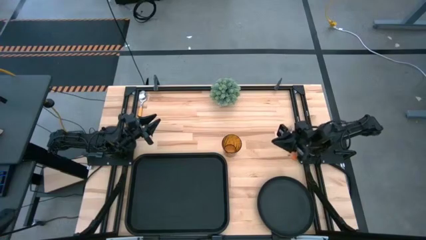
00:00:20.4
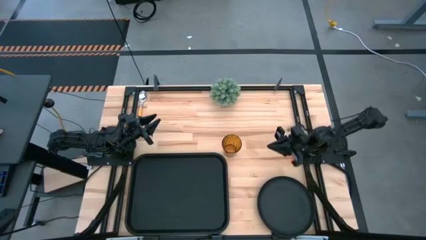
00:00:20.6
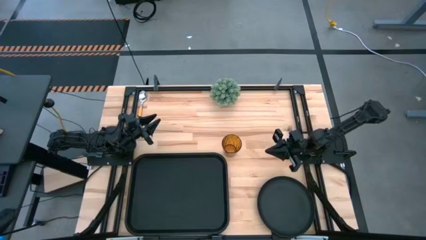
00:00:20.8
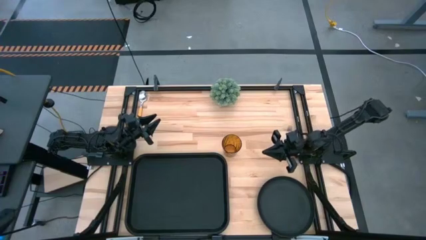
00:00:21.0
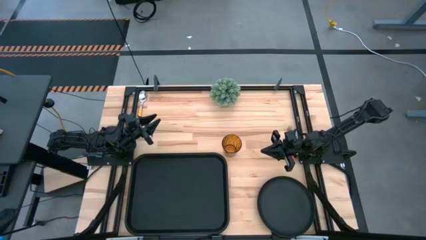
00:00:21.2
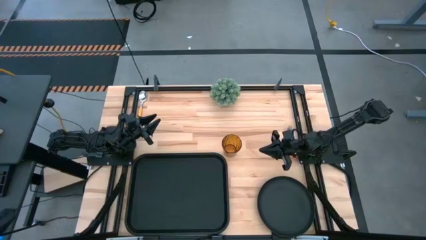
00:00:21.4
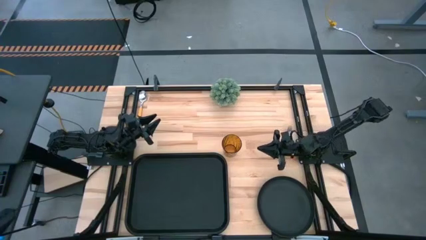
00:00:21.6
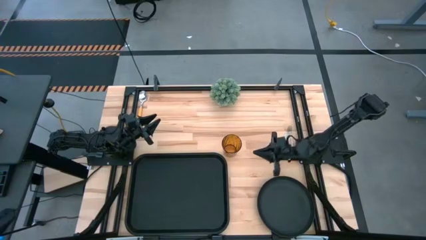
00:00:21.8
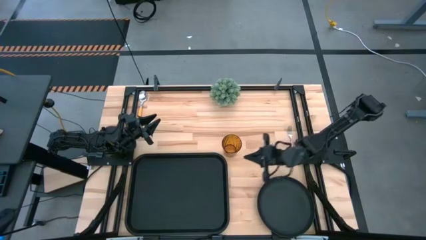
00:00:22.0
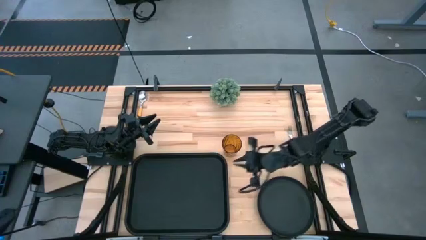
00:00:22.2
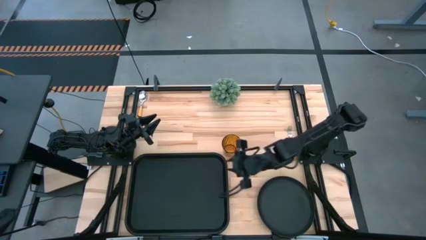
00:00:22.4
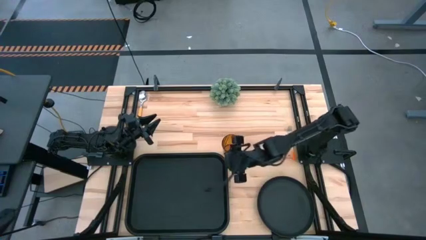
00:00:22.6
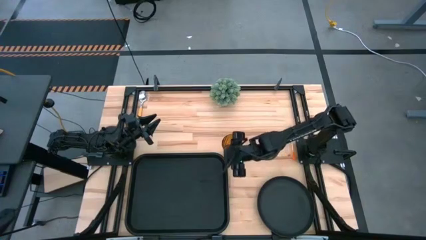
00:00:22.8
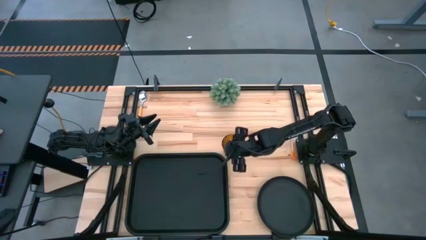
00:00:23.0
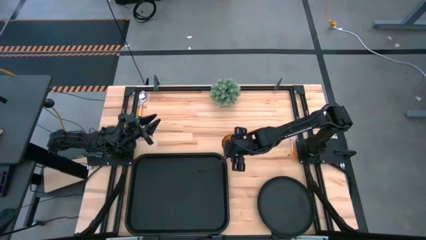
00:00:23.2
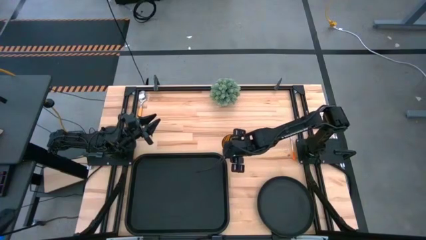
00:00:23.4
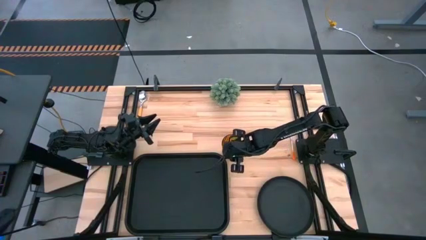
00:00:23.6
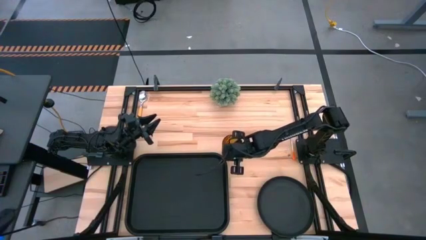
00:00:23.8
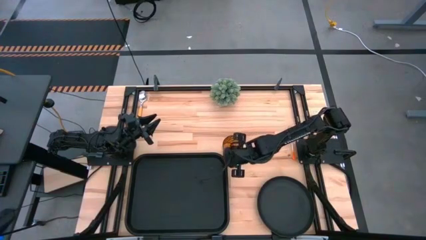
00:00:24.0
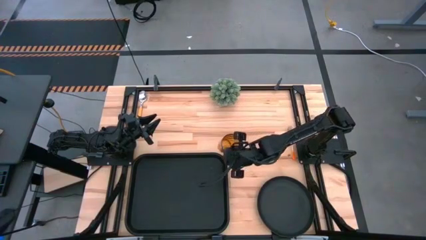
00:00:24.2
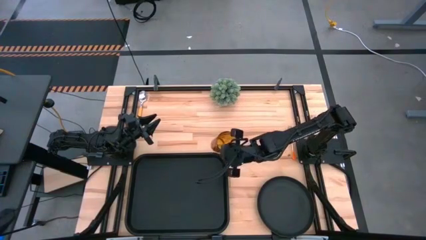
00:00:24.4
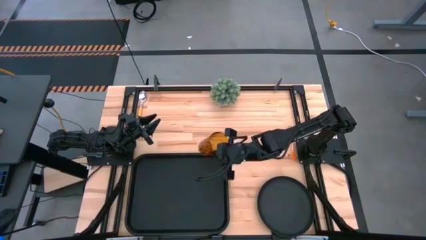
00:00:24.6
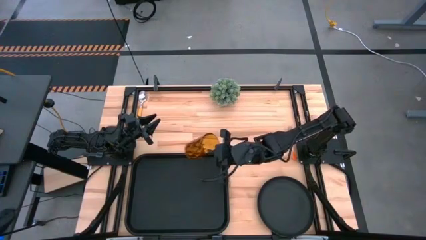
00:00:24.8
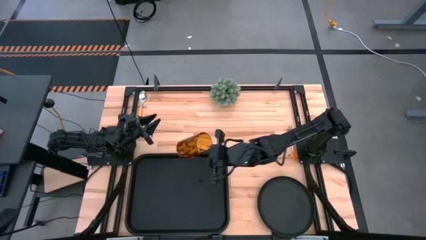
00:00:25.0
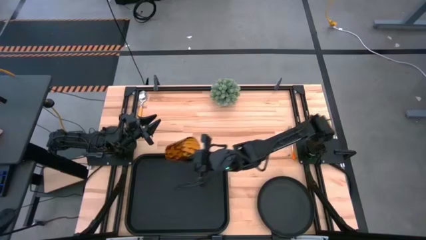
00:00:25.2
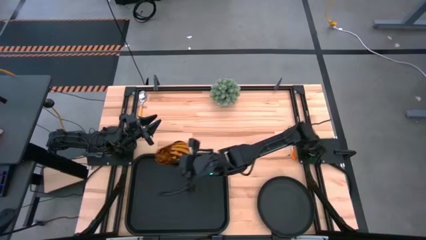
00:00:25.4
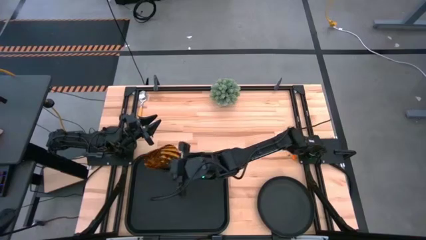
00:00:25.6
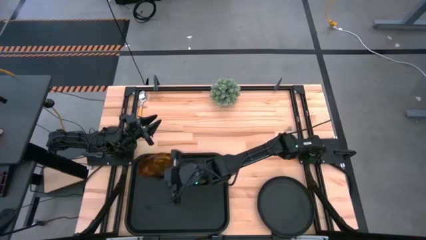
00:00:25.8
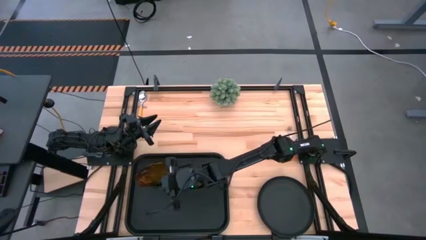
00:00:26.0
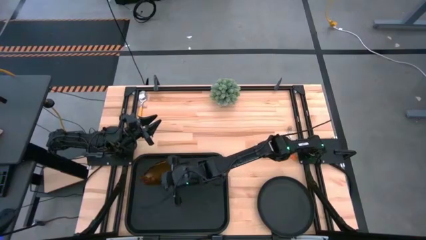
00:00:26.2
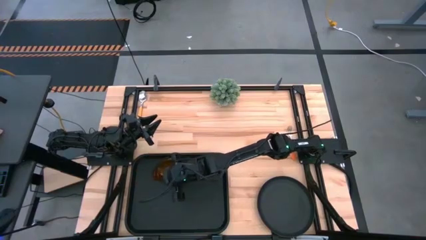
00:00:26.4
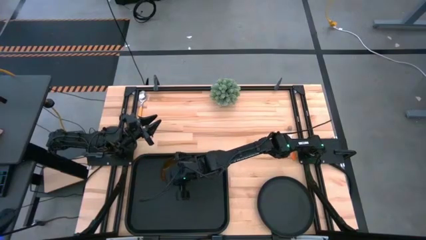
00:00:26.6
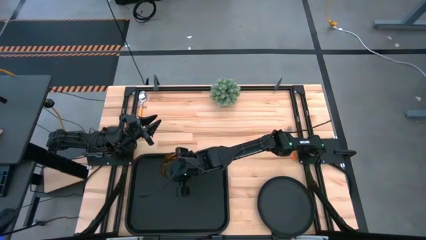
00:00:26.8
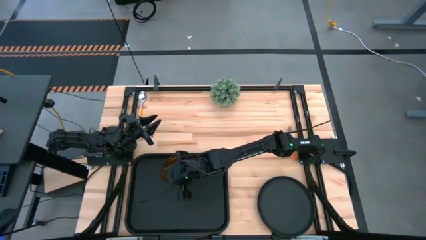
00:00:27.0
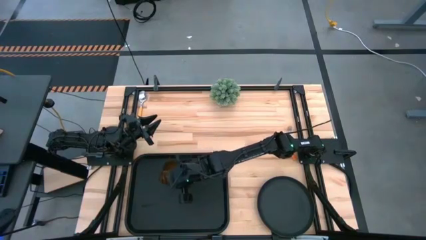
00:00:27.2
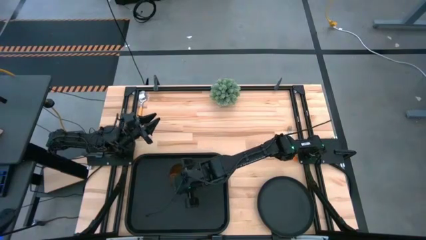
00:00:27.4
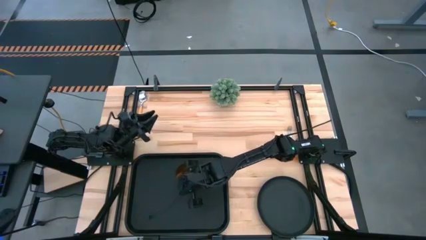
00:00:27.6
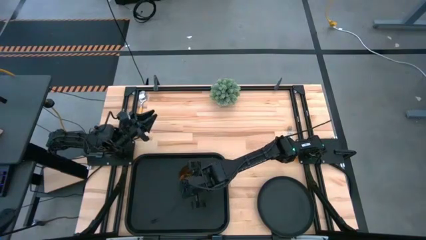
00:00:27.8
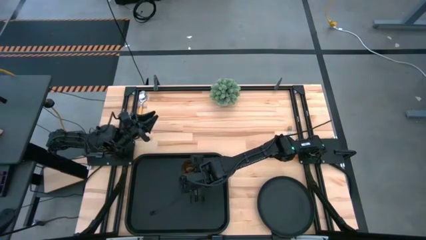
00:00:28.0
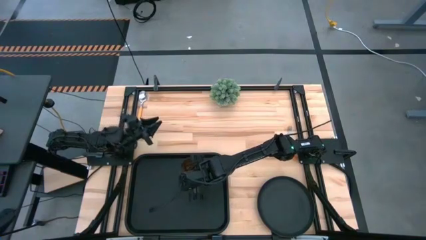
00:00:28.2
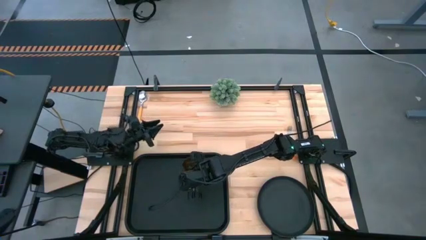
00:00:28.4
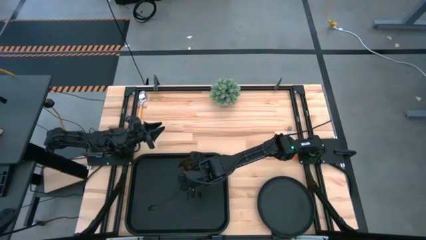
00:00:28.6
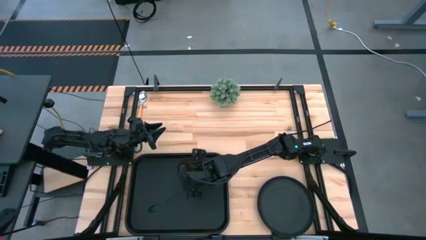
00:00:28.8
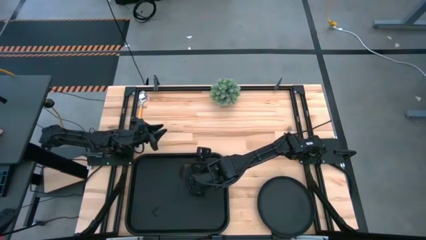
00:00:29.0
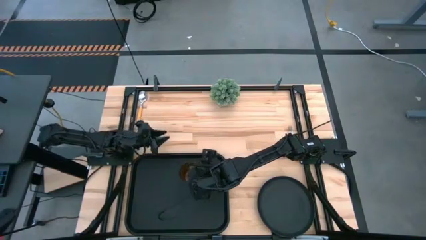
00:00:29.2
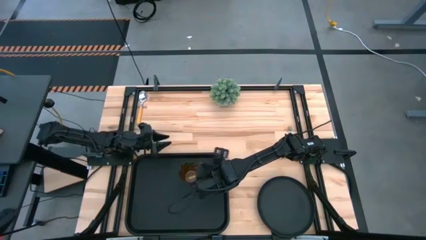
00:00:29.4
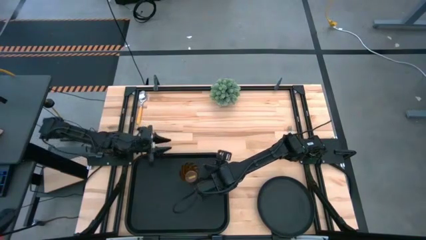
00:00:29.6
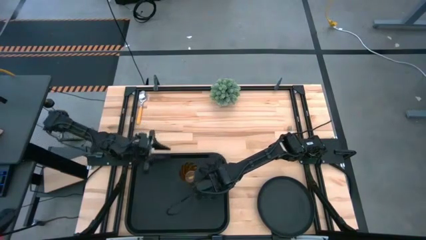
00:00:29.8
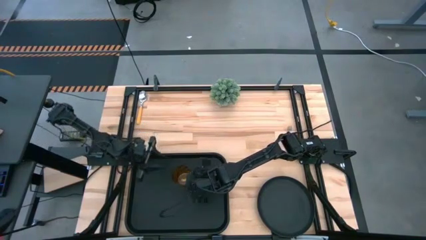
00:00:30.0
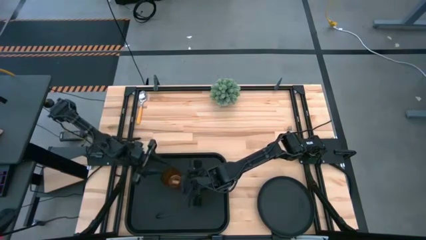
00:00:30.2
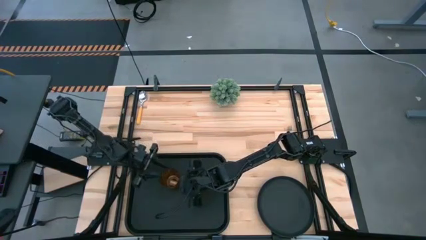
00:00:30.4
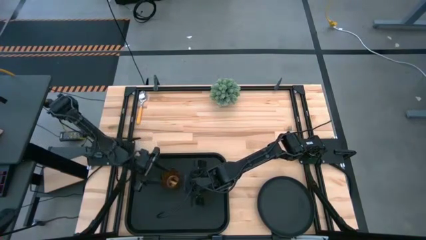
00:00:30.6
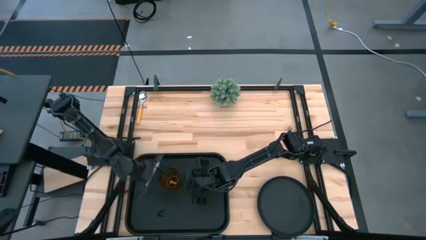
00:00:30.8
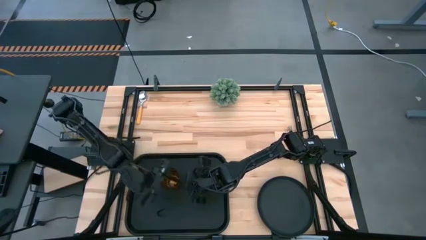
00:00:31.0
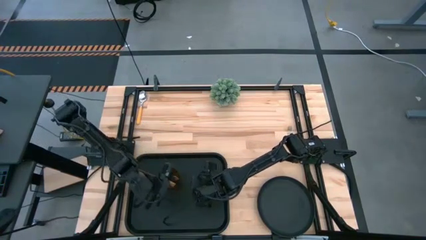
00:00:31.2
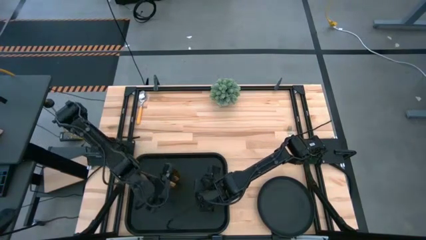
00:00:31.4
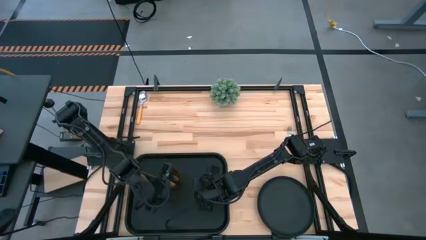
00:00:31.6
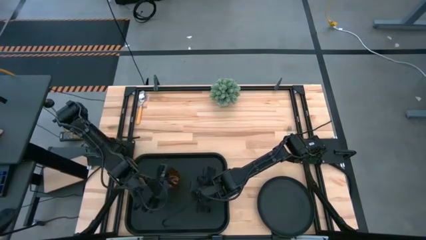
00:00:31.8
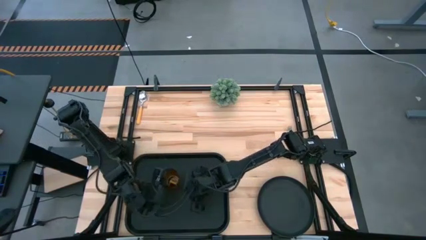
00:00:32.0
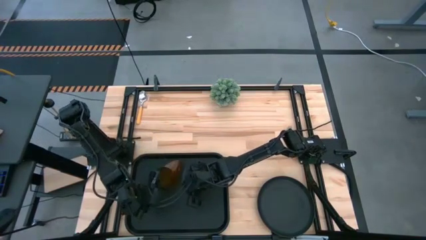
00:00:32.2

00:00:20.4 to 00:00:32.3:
Task: Pick and place plate/cup/fork/spoon on tray
Put the brown cup on the black serving tray

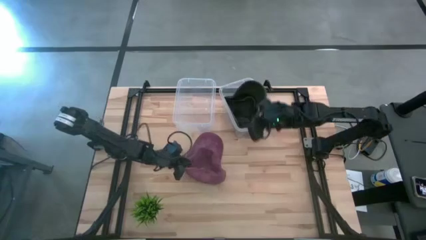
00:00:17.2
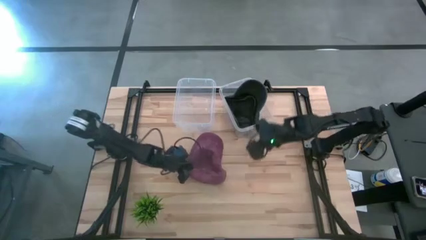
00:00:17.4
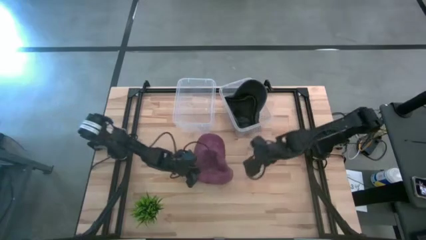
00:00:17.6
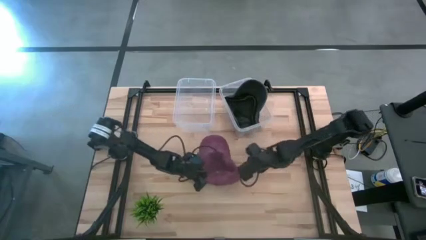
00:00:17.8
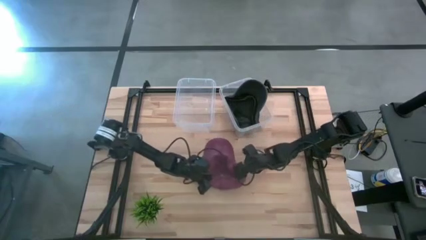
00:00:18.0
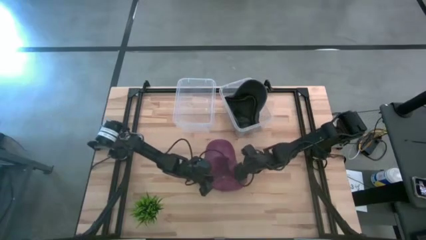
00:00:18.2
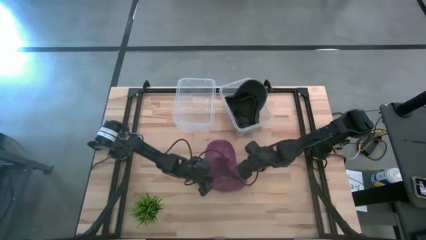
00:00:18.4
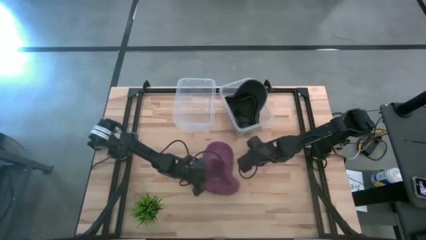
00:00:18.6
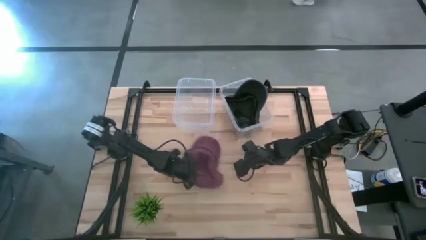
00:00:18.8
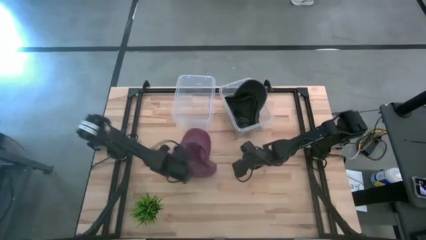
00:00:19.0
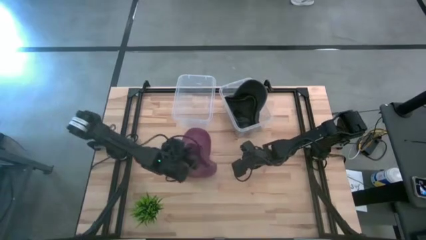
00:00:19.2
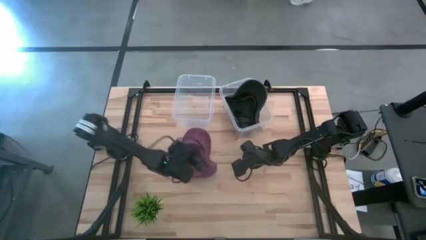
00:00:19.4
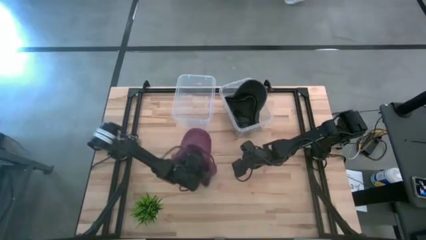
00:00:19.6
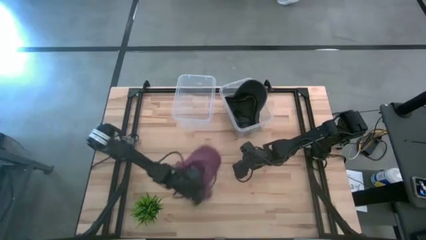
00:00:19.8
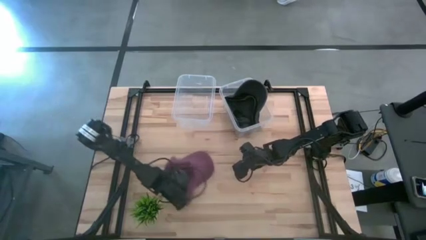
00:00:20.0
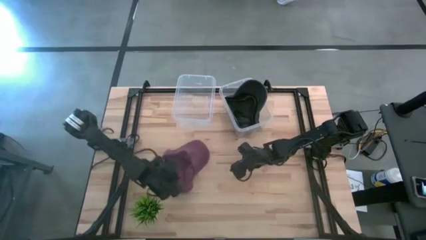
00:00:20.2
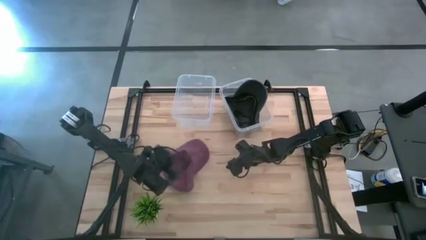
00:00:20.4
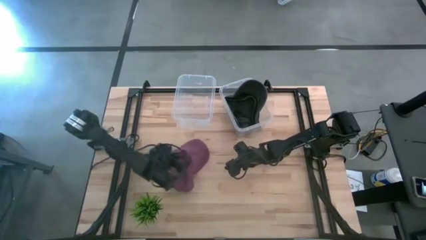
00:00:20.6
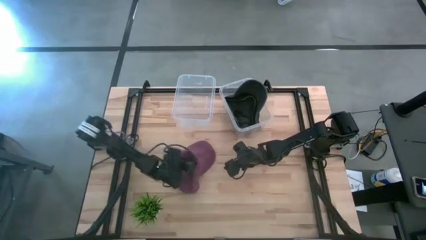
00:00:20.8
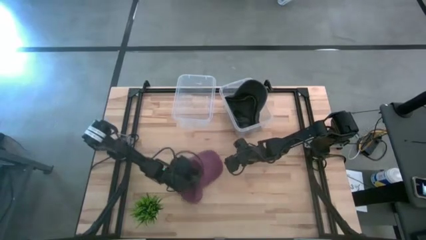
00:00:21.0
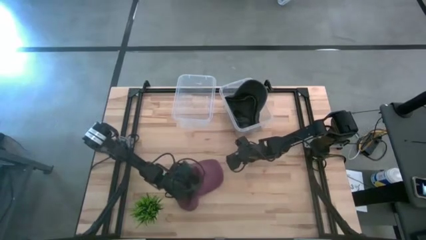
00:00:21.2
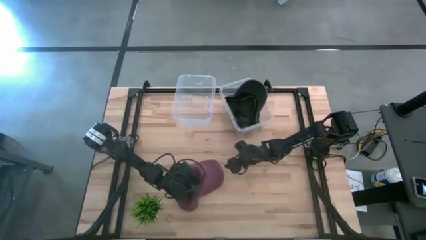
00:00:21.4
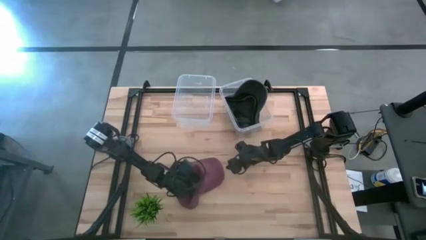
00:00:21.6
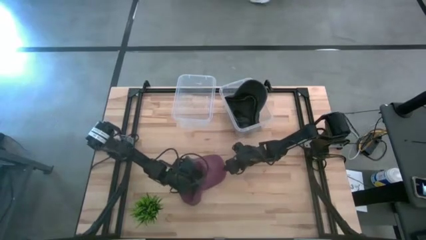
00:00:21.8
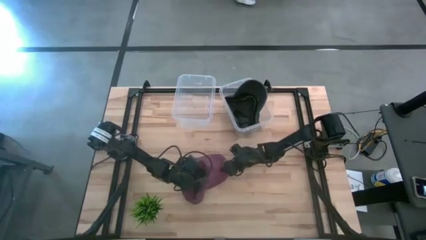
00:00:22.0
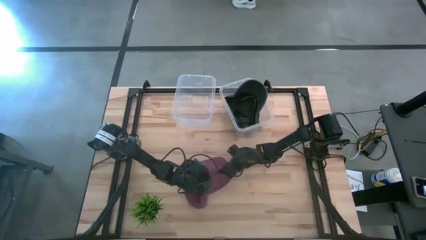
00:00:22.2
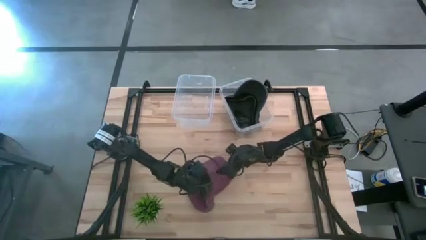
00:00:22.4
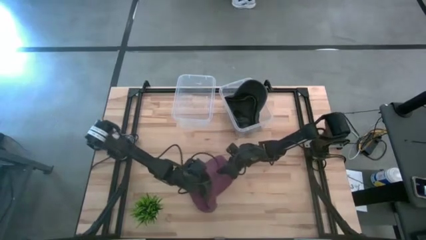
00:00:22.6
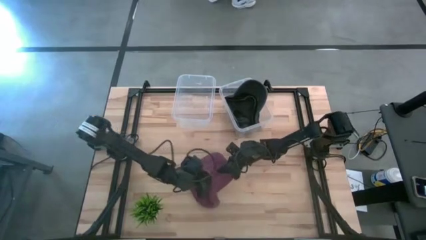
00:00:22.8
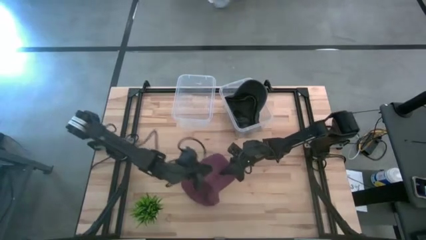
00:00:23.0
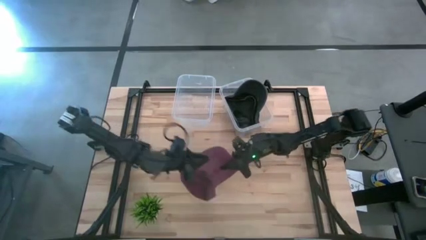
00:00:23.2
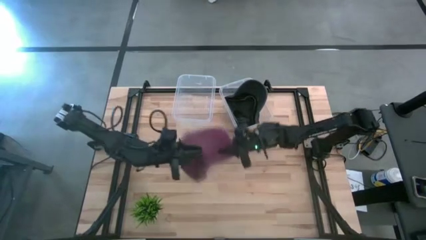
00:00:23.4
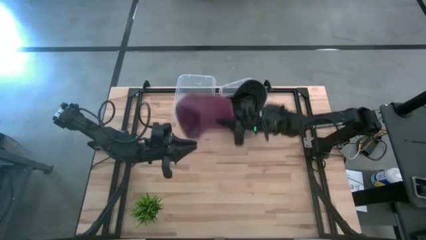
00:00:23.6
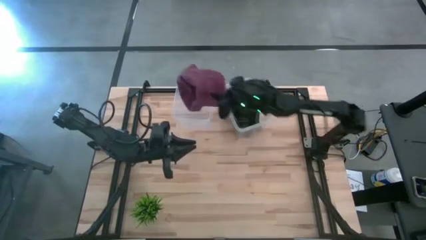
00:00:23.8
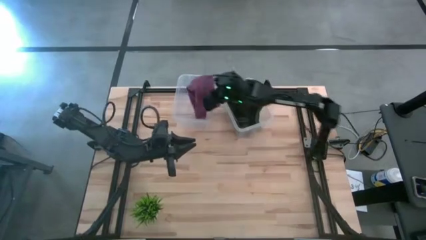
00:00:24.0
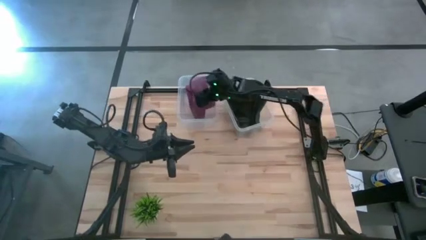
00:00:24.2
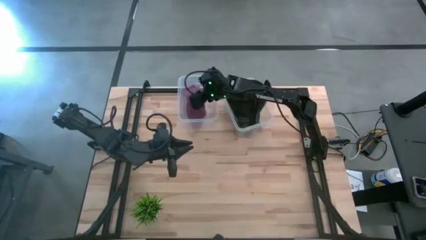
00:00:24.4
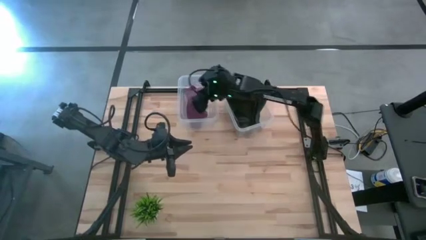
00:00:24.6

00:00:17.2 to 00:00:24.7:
Task: Pick and place caps into container
Put the red cap into the left transparent container
